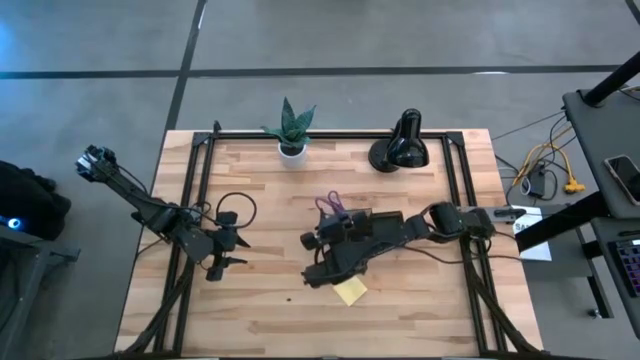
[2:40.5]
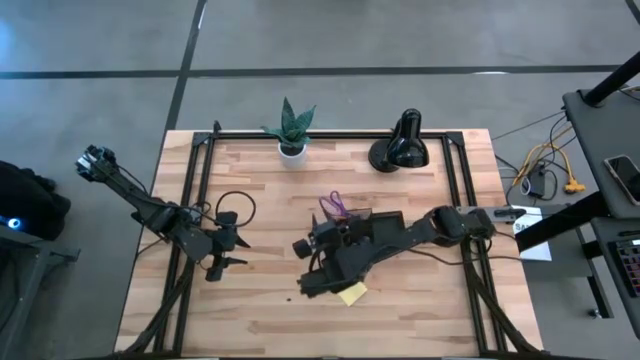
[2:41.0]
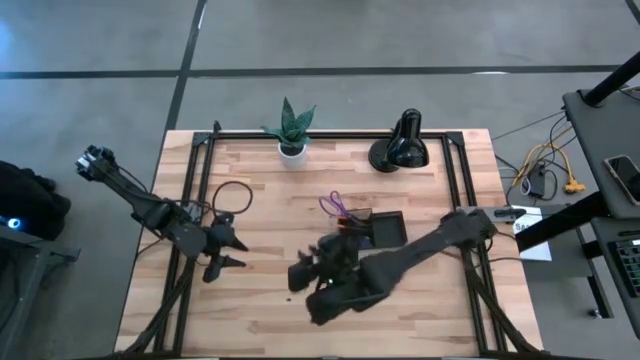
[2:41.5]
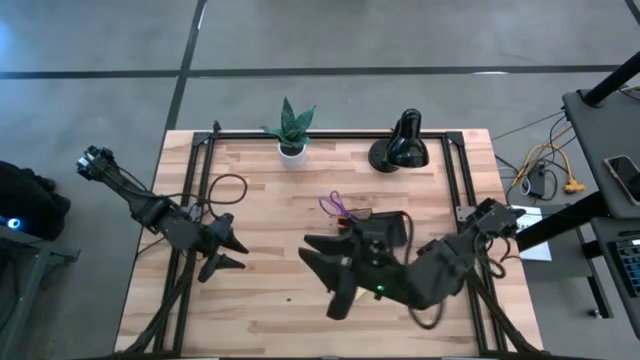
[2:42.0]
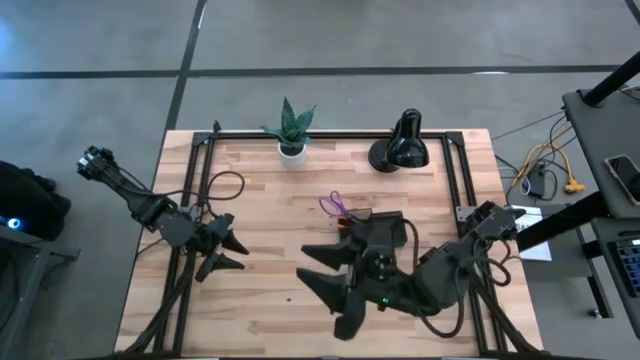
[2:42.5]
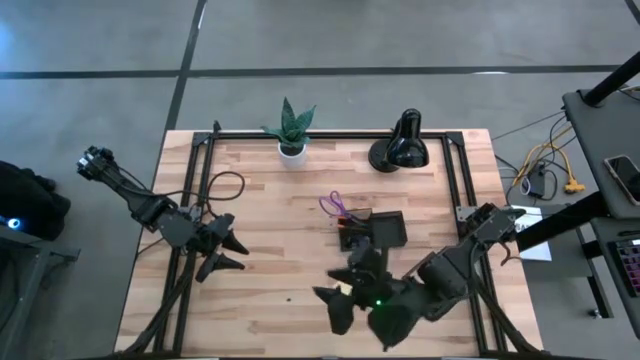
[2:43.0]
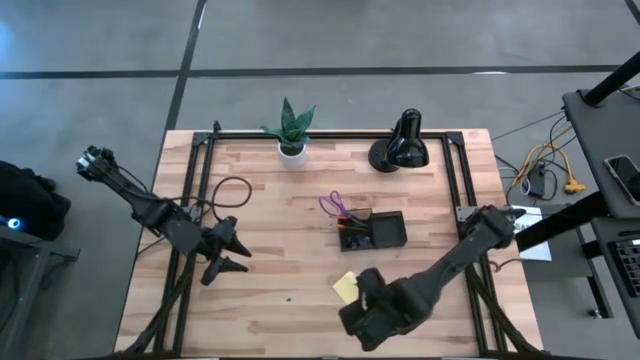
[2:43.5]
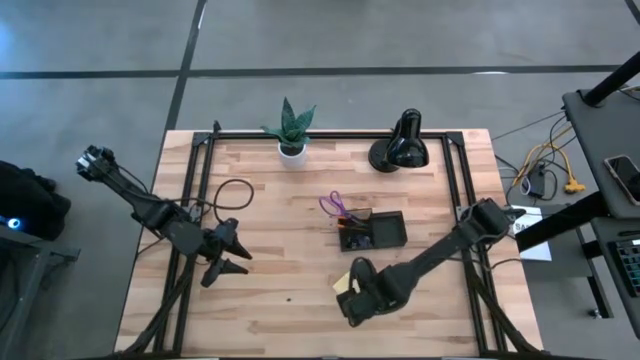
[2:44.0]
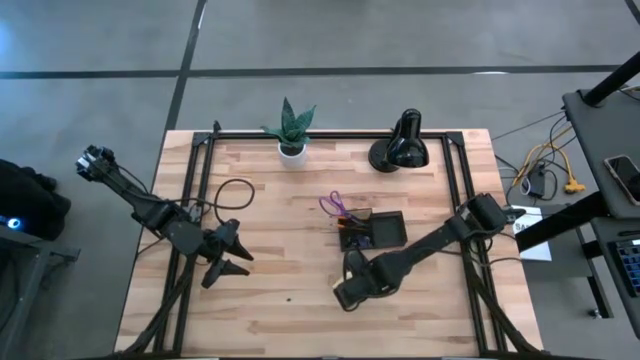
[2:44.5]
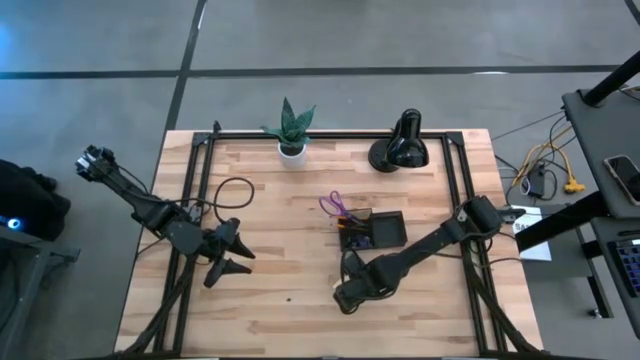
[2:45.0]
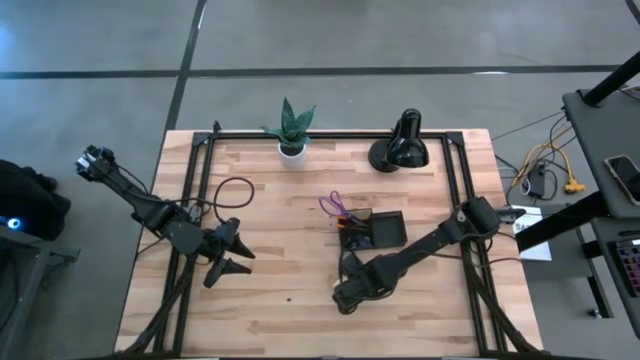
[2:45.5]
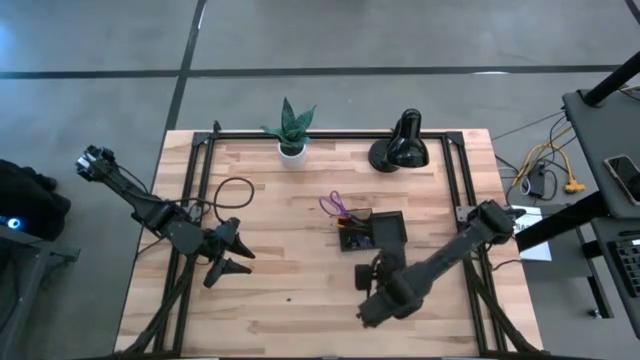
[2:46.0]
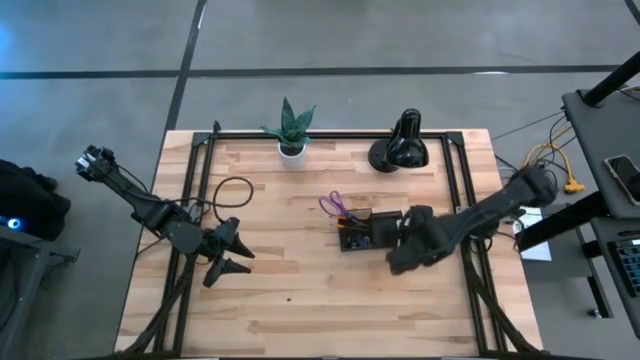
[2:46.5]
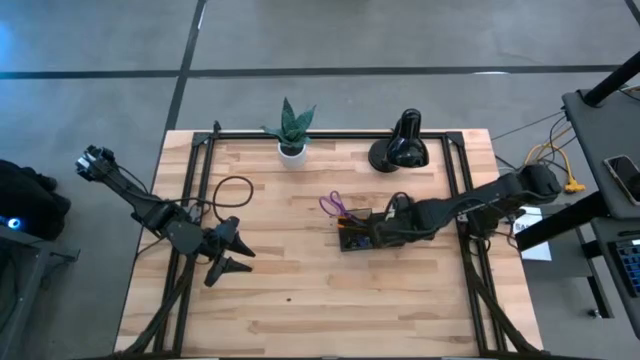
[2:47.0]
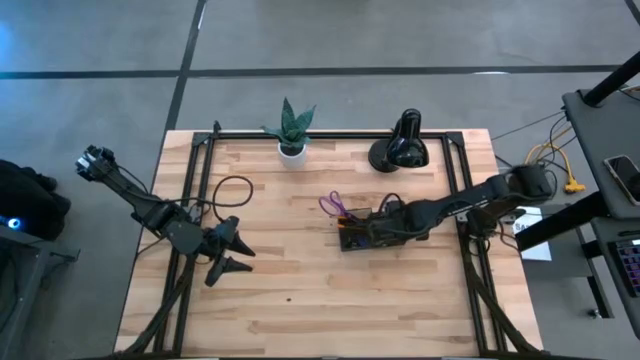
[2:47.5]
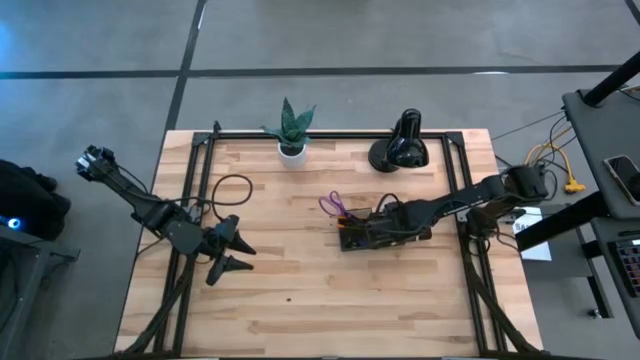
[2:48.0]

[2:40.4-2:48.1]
Task: Pick and place office supplies into organizer
Put the yellow sticky note into the black desk organizer

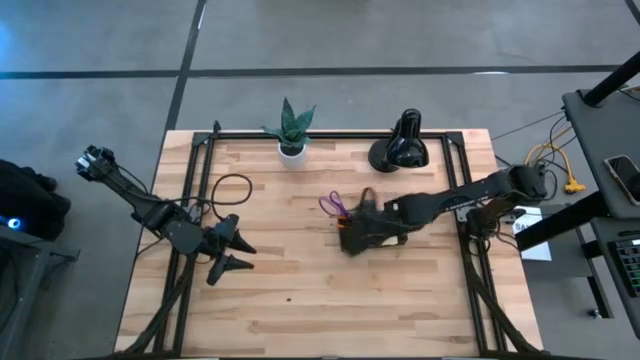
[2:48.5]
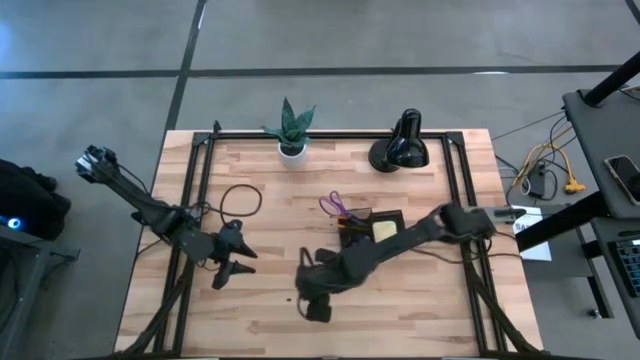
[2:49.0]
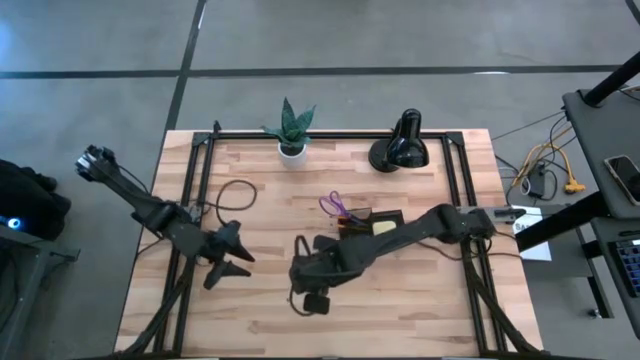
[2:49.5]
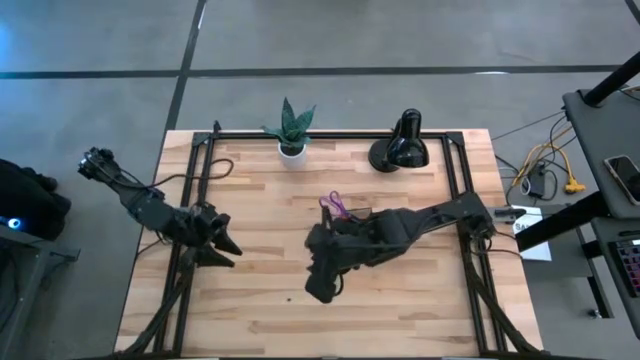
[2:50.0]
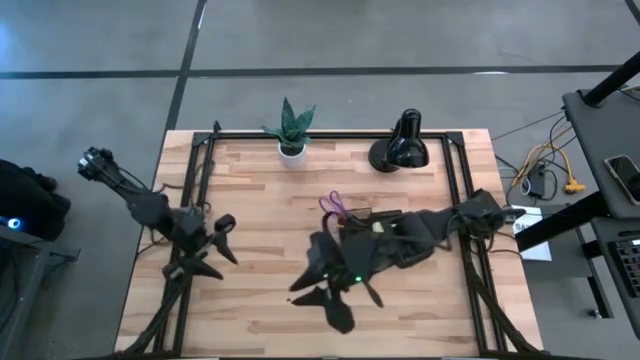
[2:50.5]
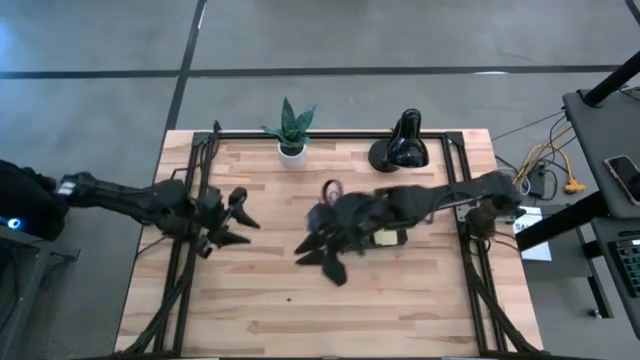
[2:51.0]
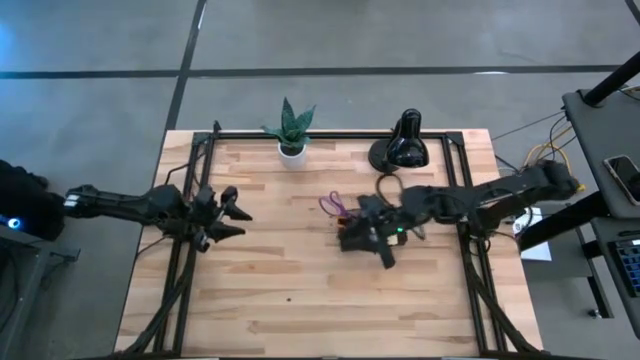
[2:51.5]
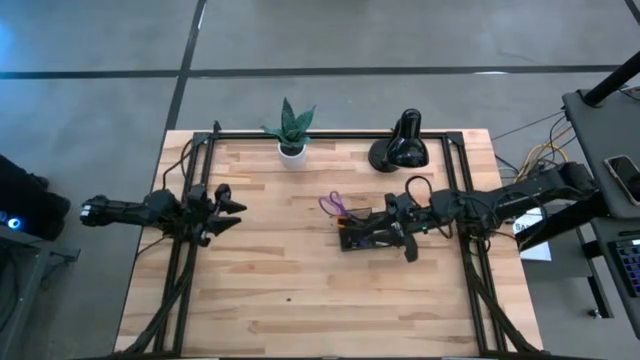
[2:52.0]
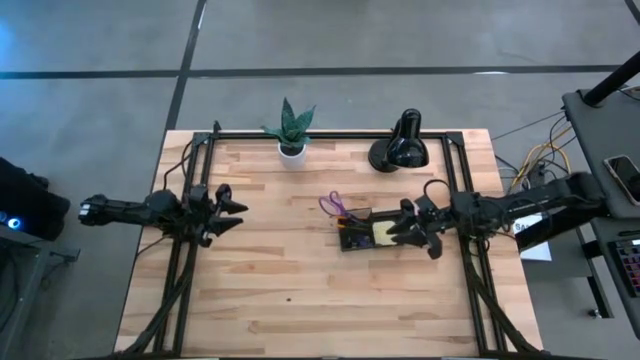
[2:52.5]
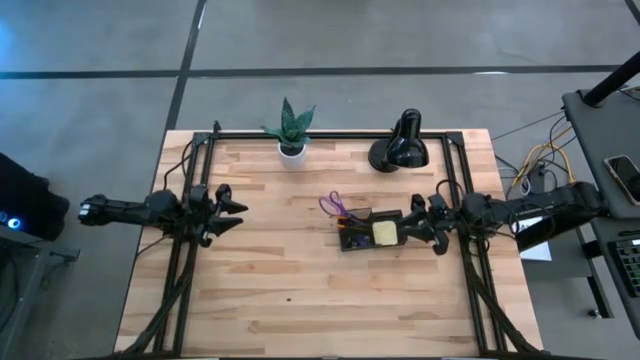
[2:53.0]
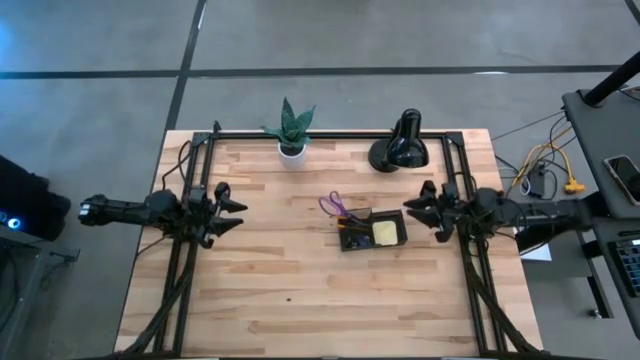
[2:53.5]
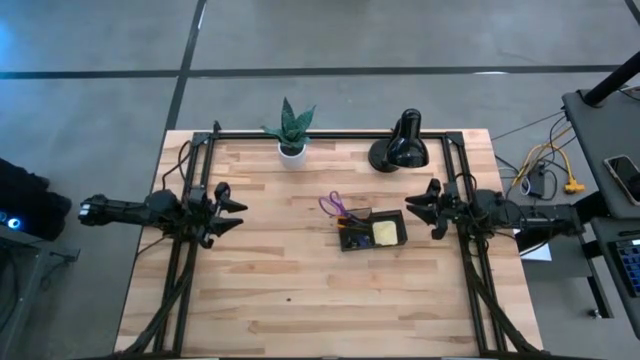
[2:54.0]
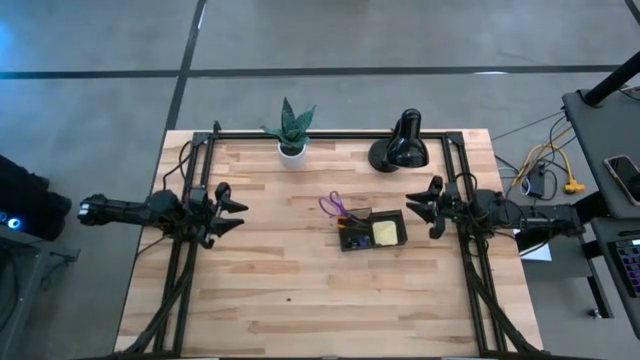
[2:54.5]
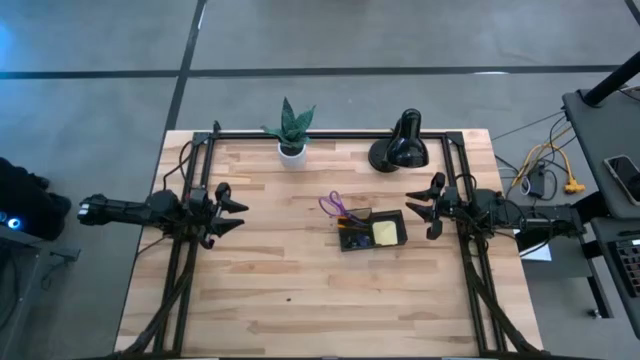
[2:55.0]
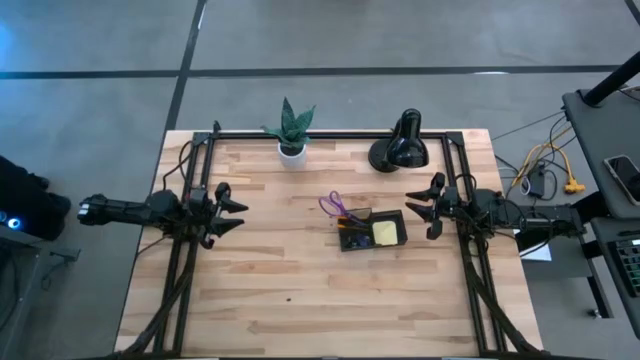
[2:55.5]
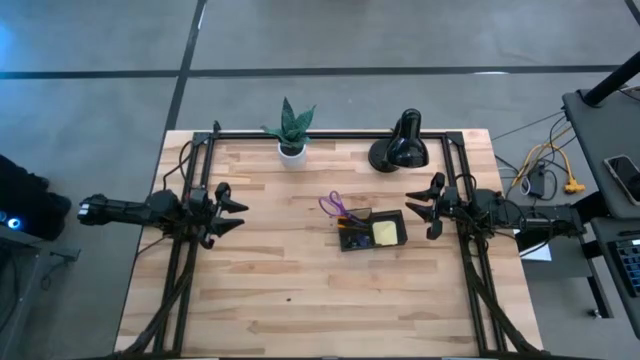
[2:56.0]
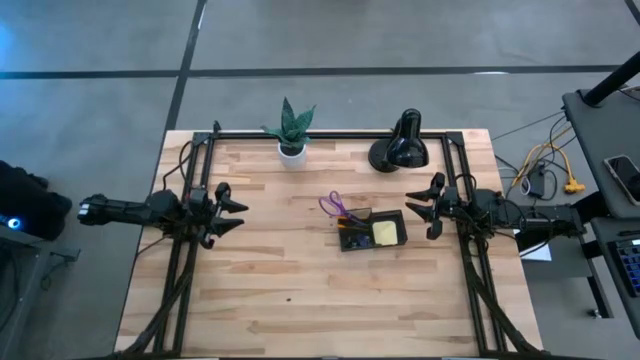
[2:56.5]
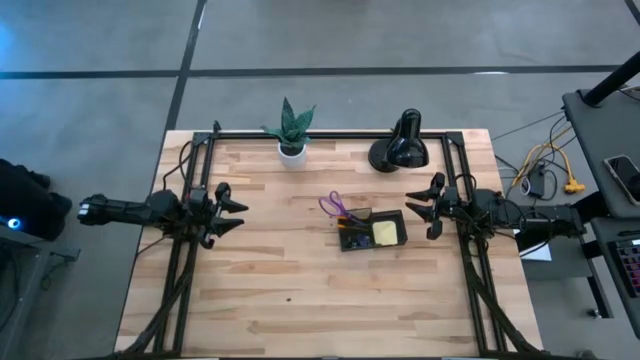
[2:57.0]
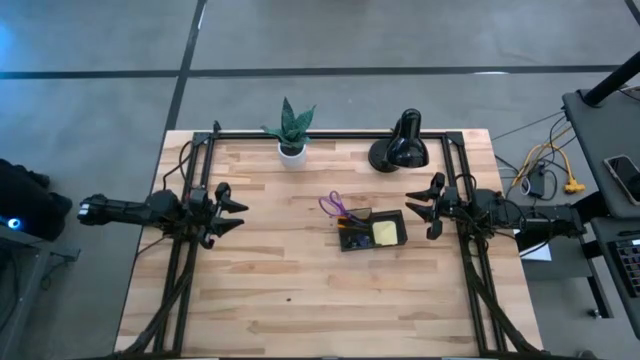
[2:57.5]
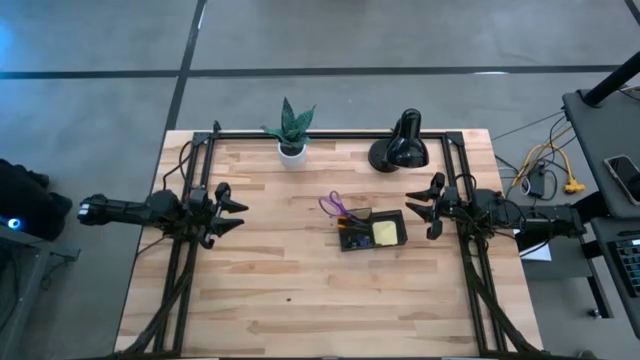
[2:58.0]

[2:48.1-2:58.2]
Return to Home Position

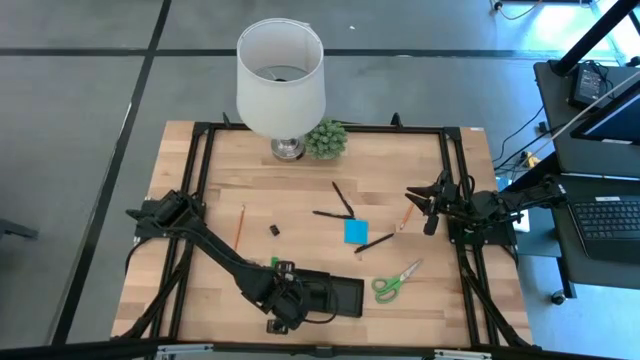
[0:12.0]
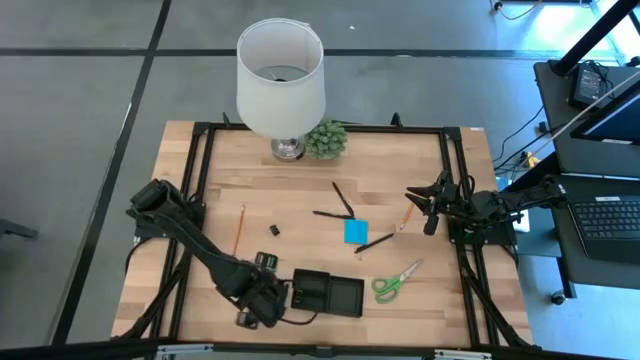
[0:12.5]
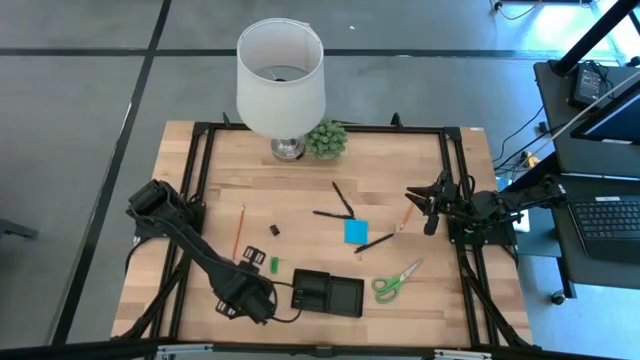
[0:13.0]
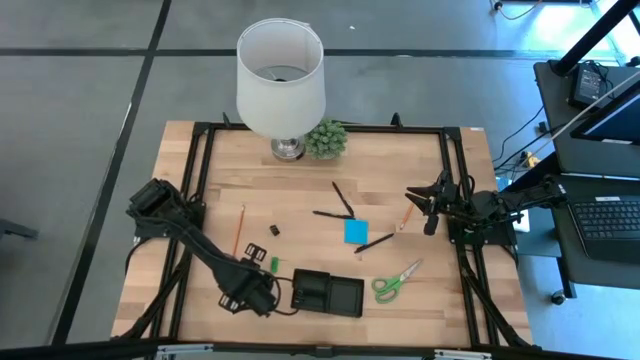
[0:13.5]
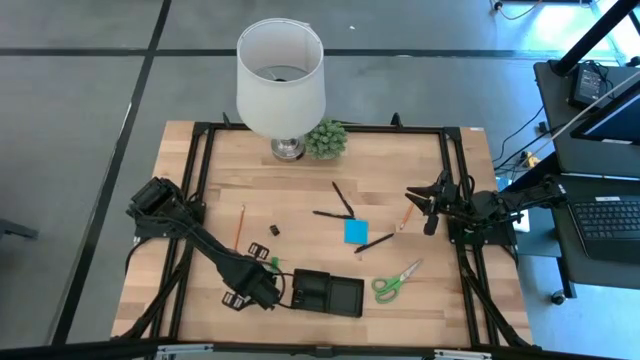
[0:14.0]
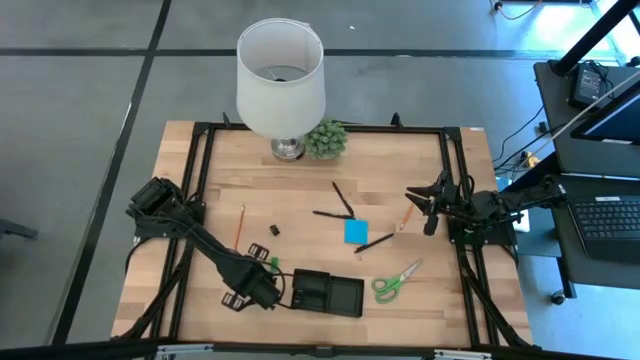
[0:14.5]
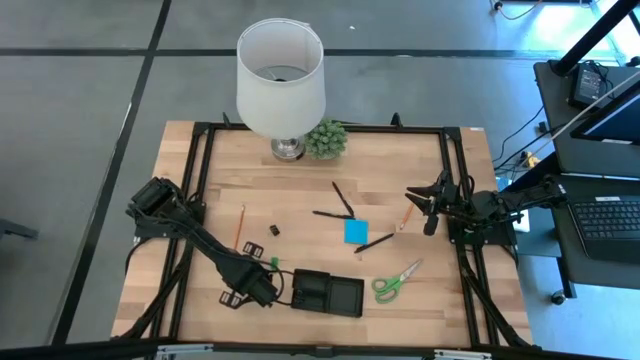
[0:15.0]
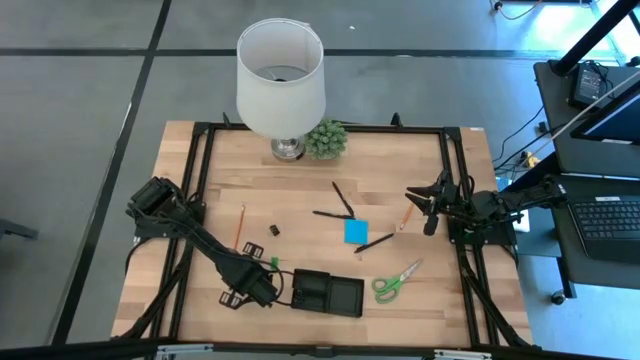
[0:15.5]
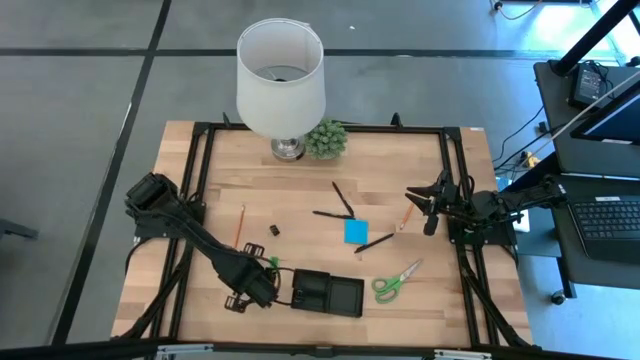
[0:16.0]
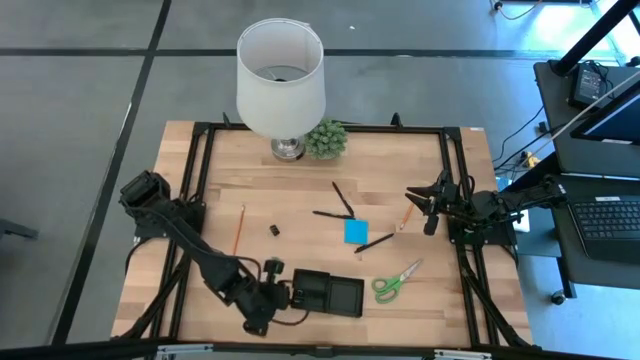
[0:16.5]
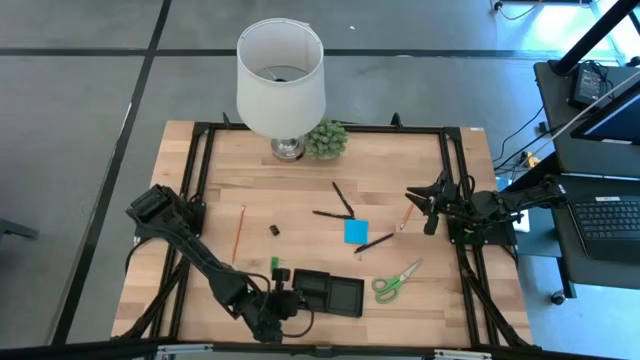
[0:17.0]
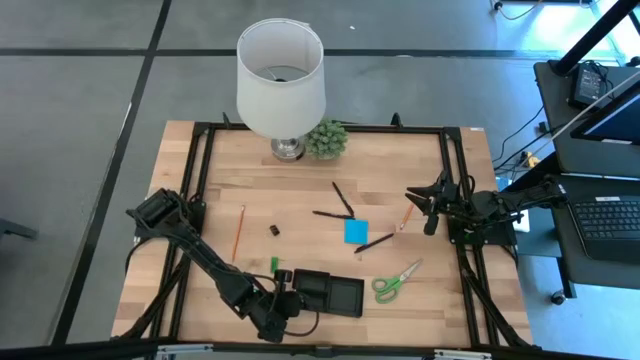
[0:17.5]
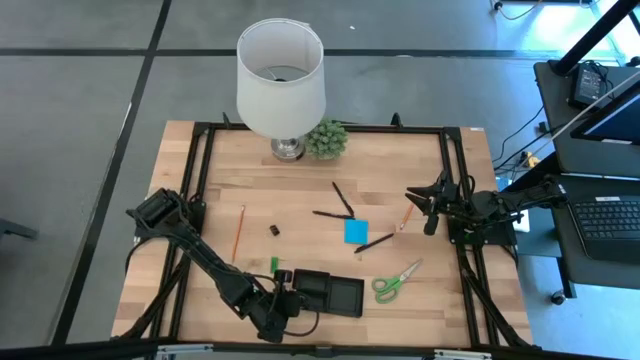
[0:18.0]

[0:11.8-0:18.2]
Task: Pick and place office supplies into organizer
Put the bottom black binder clip into the desk organizer
